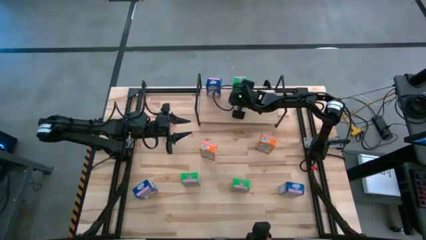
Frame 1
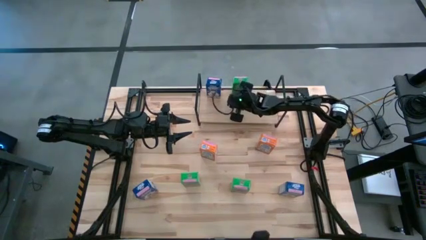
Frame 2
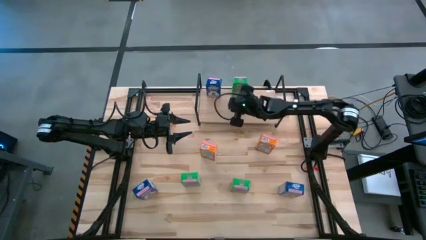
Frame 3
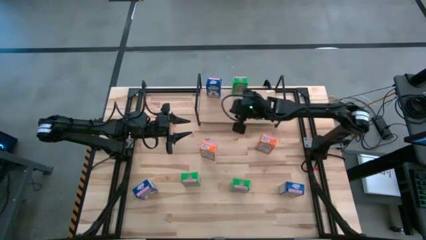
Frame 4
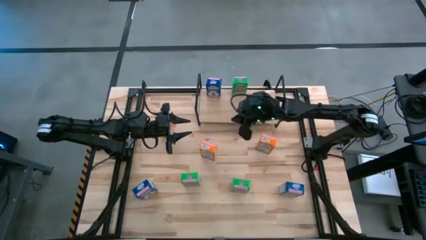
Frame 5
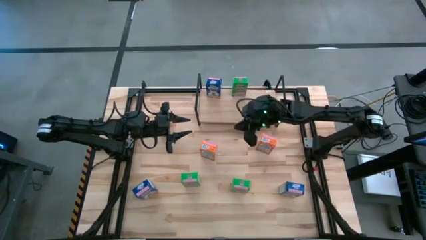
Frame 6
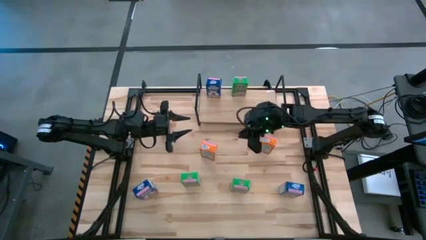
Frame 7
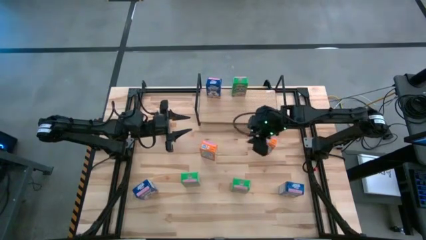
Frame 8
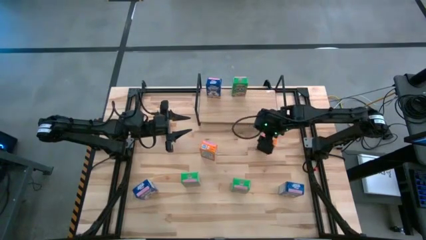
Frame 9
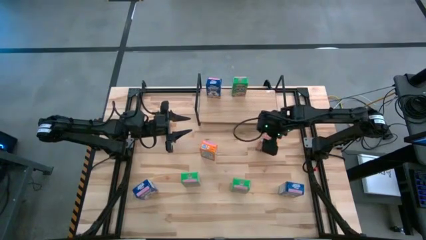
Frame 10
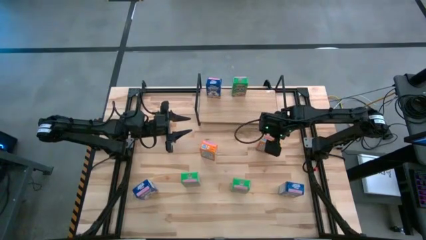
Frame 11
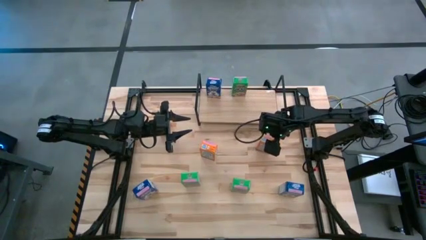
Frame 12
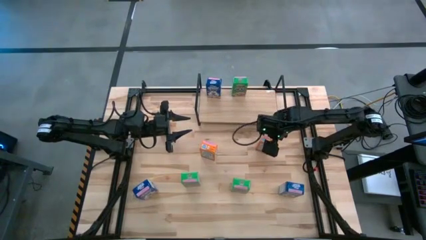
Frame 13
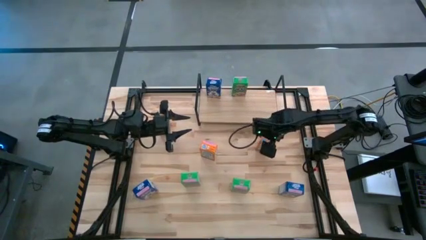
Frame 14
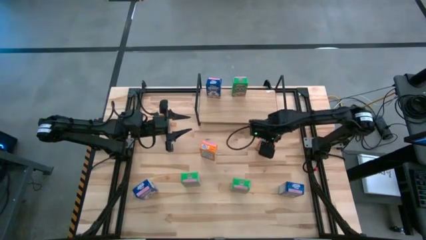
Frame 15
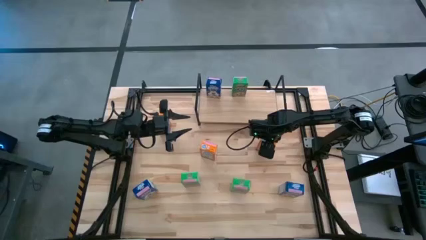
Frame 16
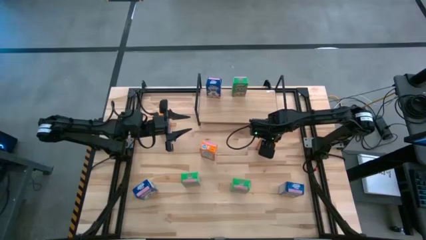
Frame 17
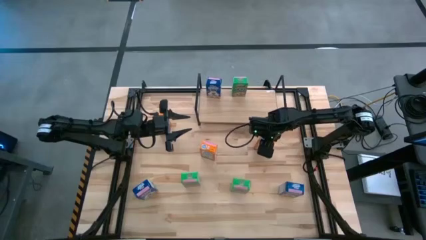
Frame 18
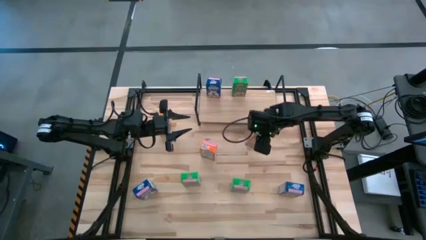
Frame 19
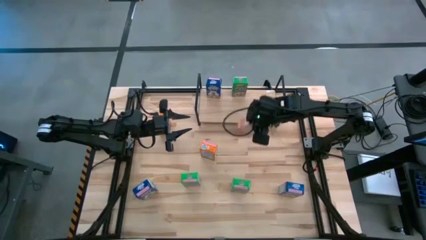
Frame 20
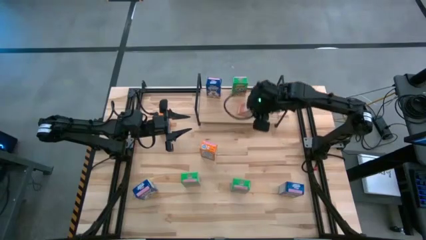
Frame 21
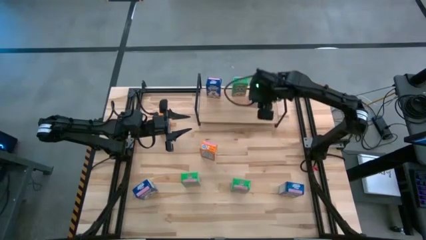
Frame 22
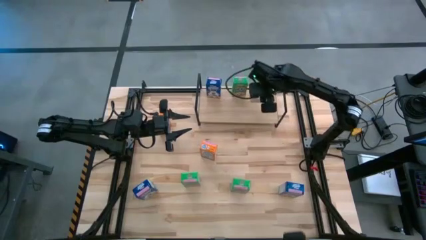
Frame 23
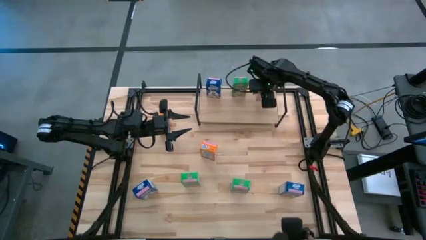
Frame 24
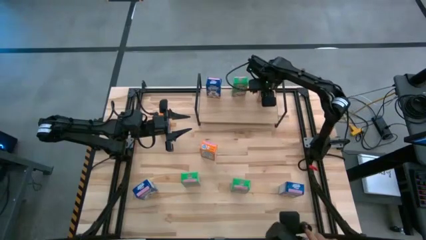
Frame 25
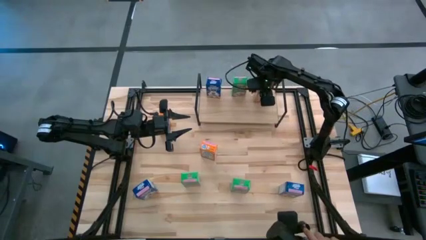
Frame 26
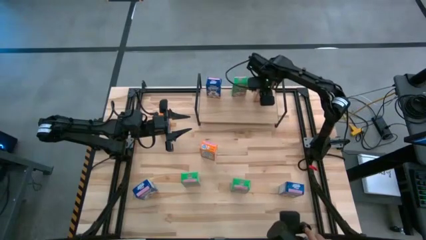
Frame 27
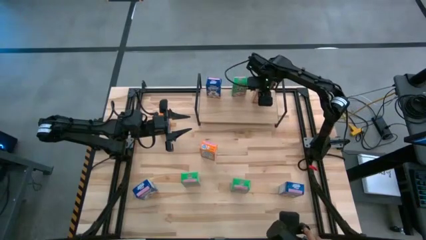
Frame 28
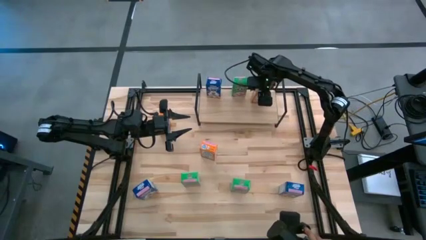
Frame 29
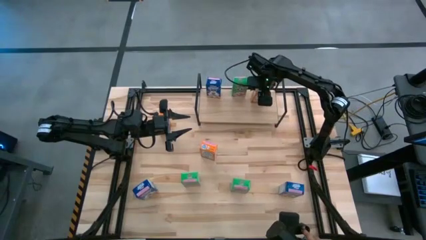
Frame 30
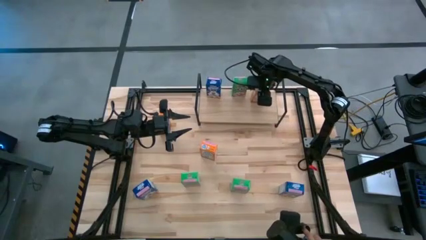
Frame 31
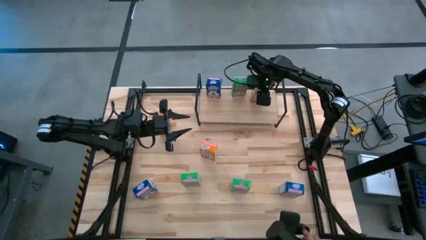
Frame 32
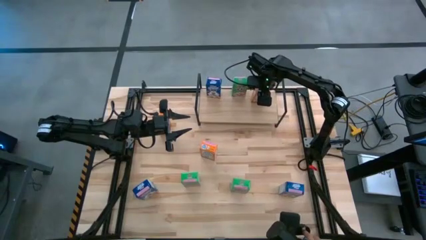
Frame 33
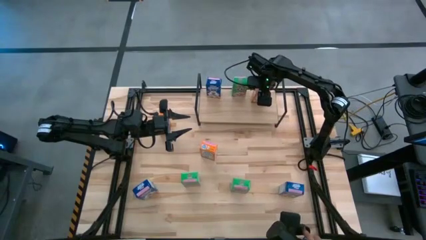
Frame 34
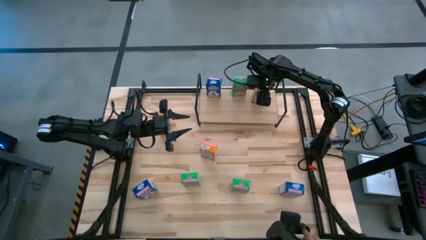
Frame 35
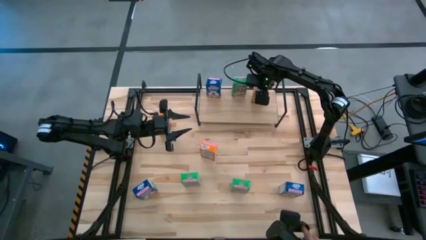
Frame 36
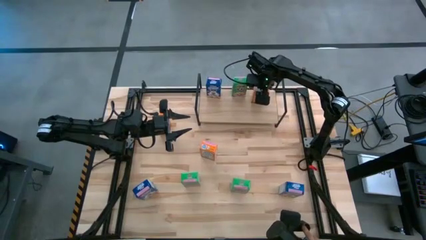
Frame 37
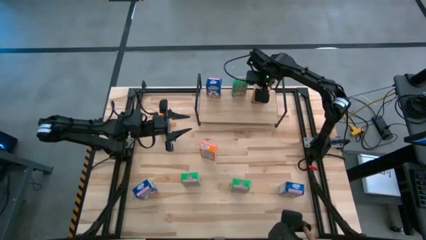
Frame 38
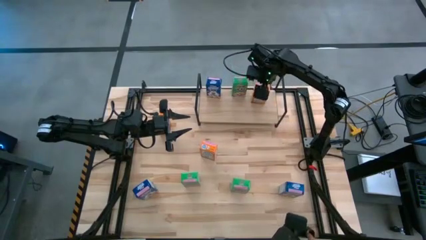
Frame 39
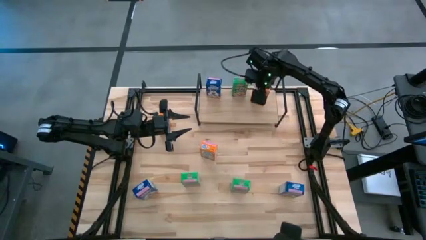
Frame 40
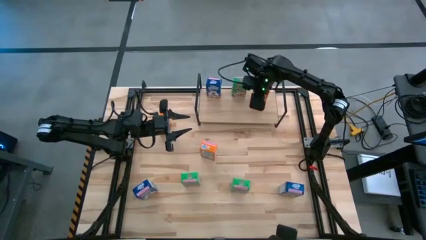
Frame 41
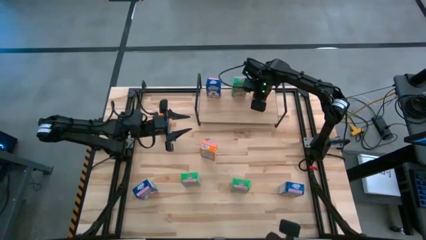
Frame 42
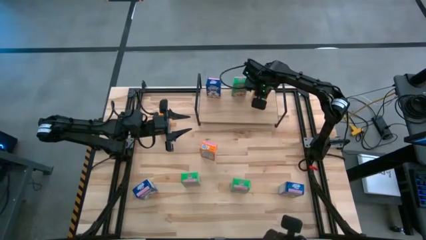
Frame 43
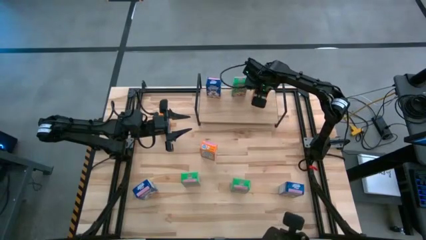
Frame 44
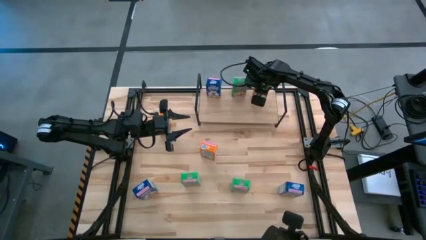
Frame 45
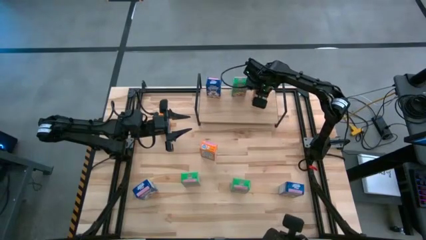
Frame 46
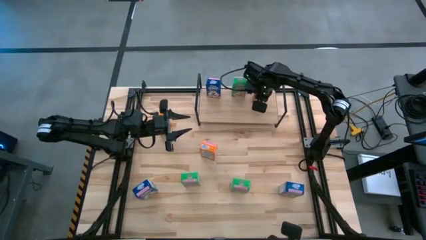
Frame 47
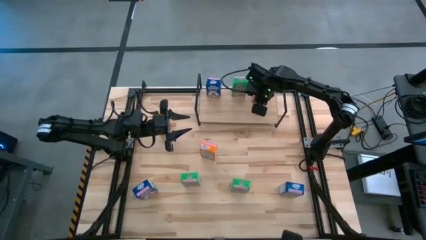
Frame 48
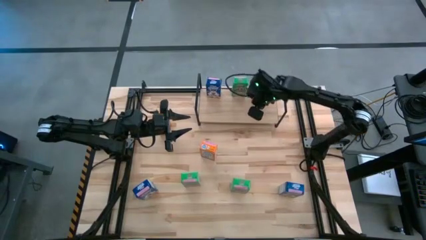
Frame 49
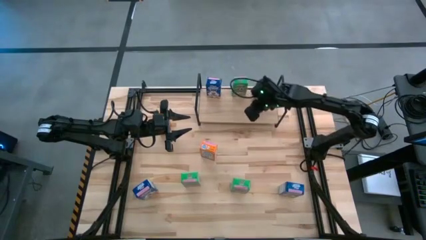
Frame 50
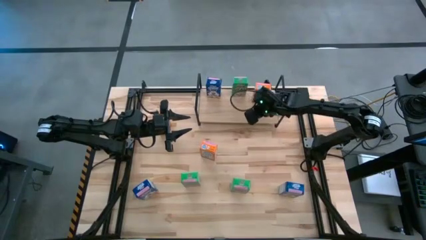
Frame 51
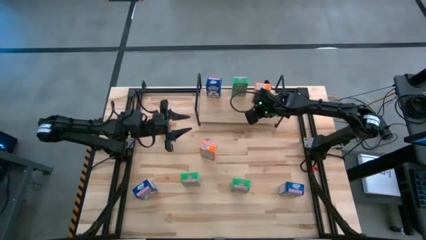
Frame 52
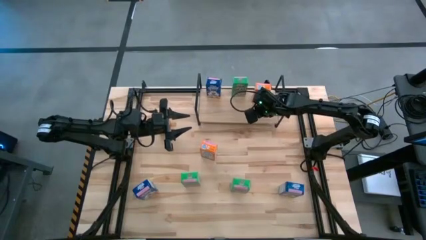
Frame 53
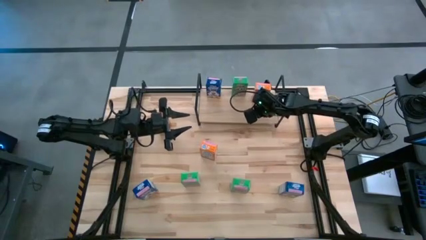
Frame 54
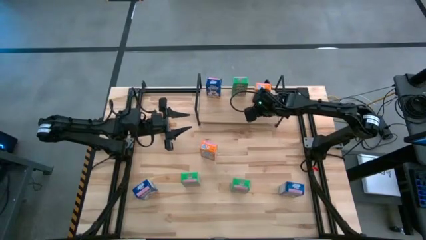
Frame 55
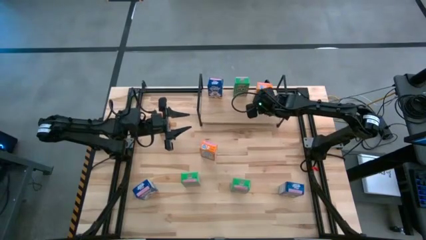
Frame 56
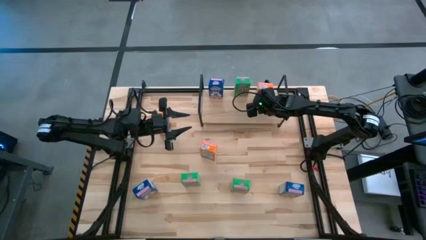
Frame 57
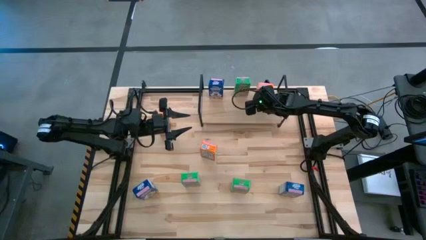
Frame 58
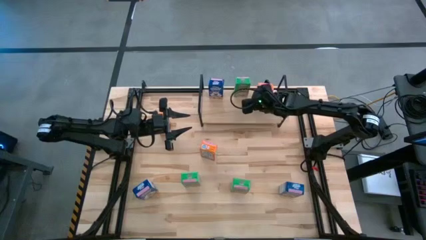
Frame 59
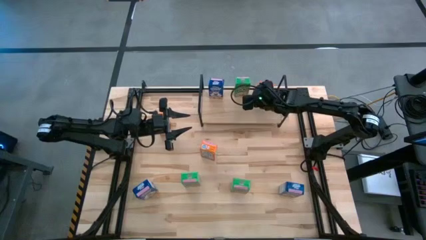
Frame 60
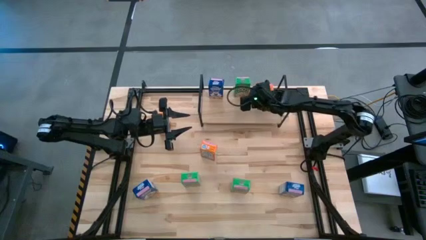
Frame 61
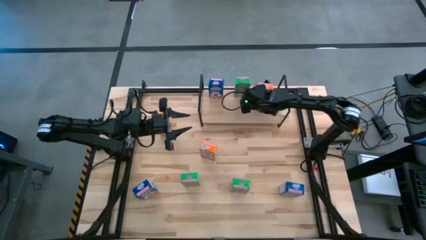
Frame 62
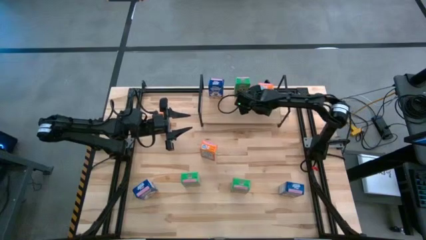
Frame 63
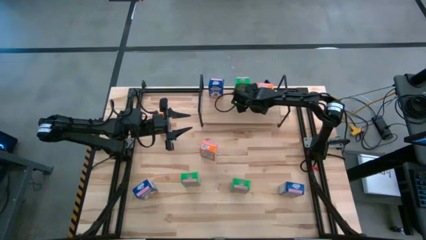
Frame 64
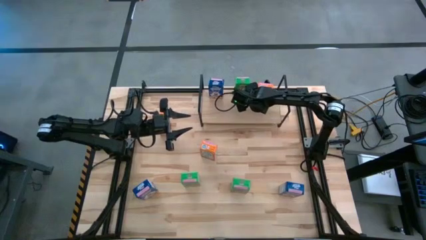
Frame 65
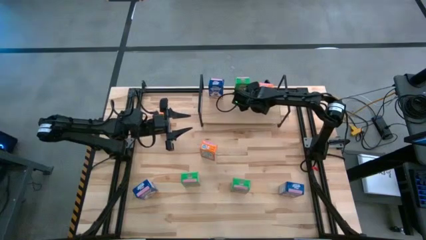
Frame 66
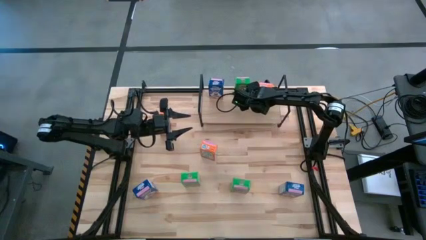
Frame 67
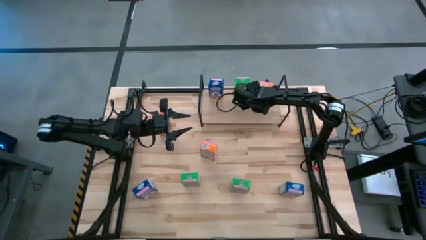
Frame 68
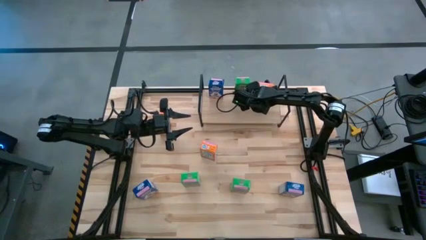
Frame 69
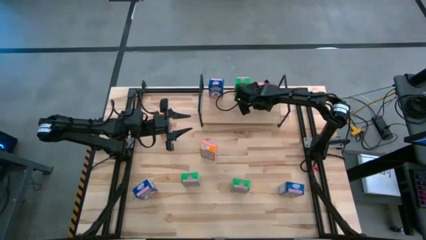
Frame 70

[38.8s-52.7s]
Task: Stack cereal on shelf
Put the bottom right orange cereal box on the shelf

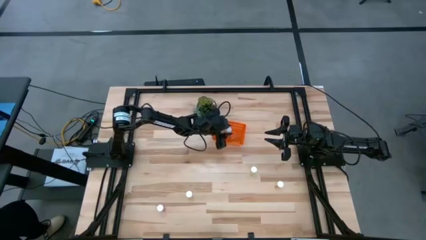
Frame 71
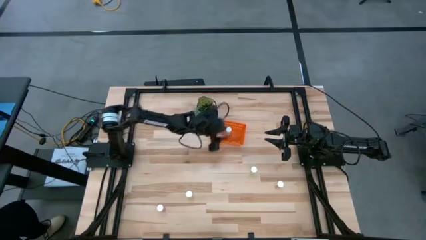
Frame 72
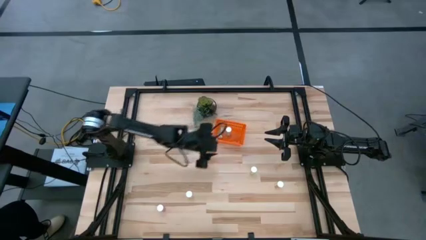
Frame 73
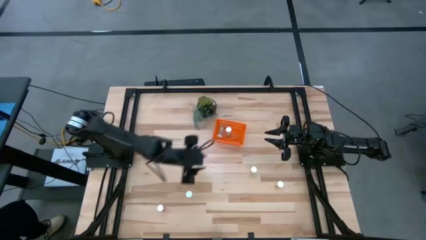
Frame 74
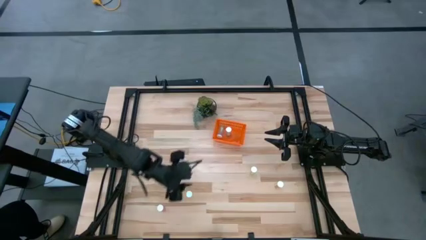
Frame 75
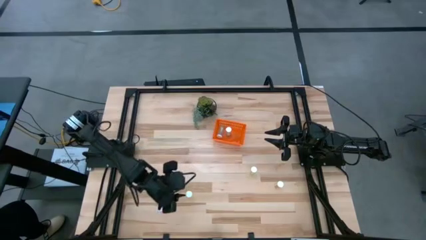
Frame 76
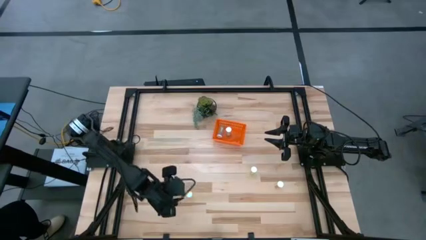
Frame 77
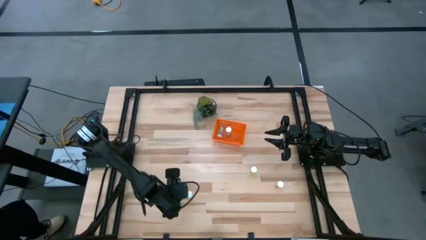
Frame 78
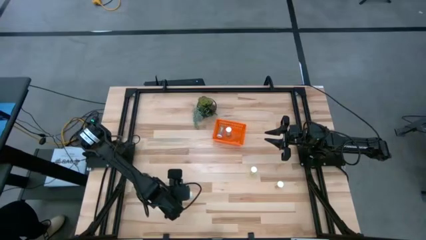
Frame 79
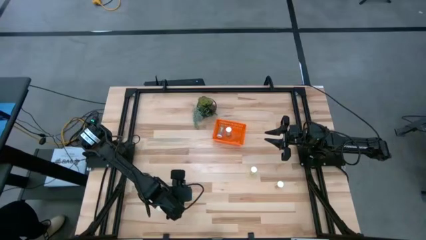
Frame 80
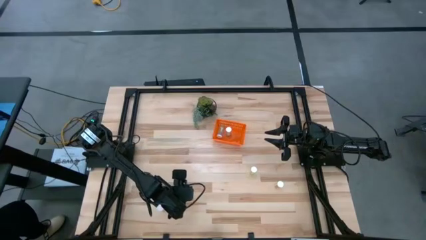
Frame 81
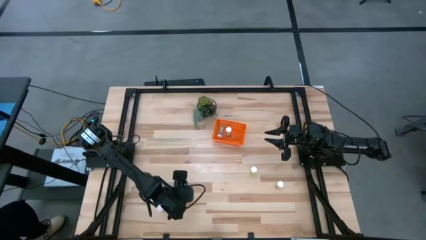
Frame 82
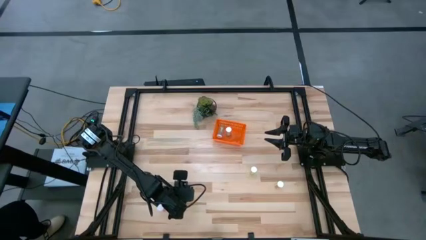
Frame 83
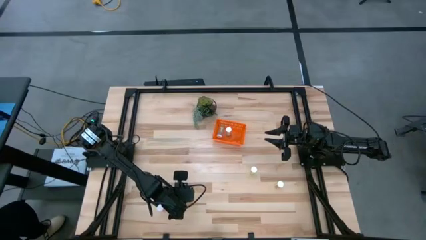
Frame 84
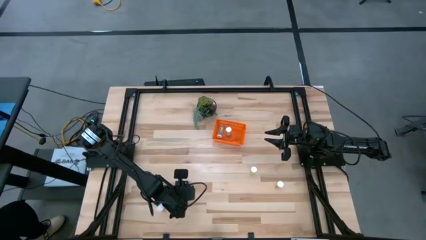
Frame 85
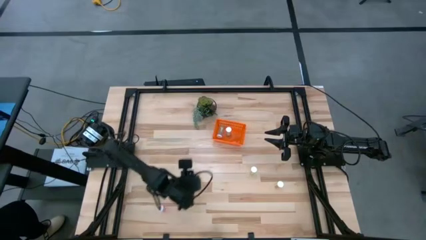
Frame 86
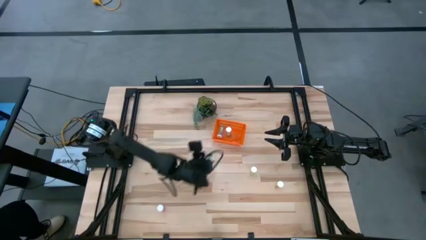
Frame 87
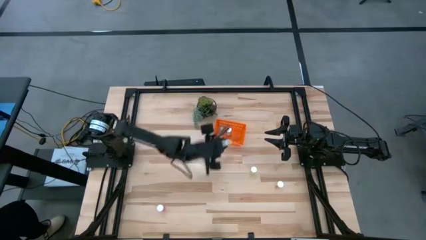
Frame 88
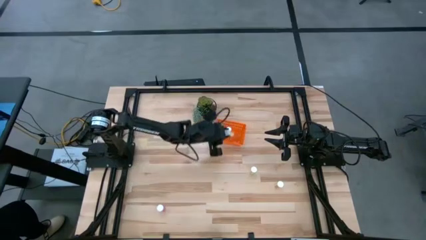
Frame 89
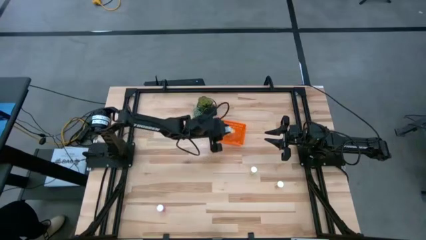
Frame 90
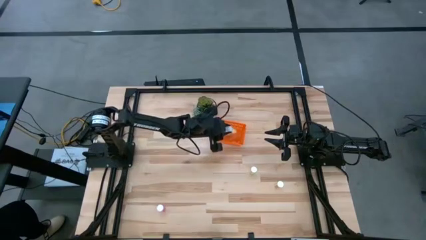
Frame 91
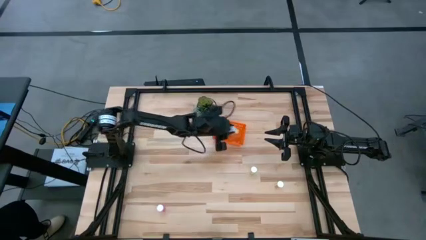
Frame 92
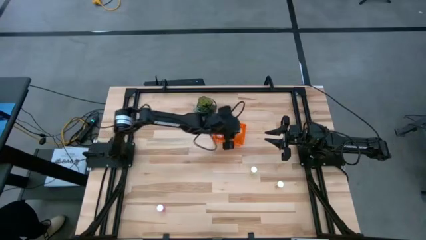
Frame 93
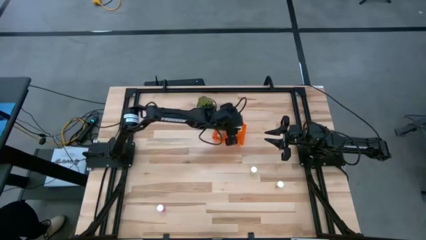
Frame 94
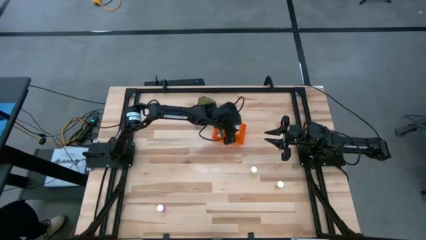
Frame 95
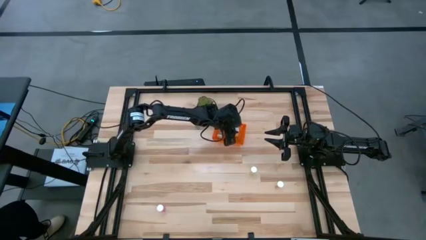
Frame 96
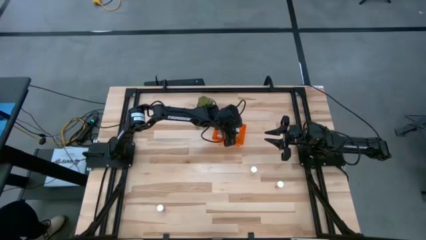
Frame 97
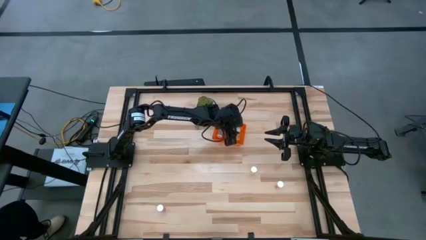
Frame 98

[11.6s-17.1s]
Task: Pick and place pill bottles into a basket
Put the yellow pill bottle into the orange basket
